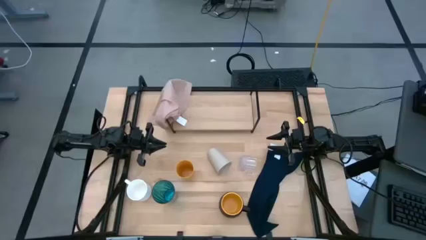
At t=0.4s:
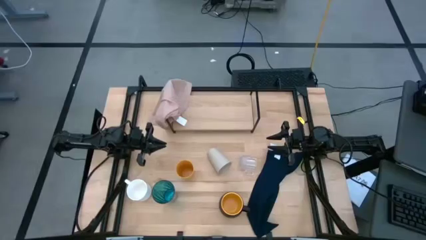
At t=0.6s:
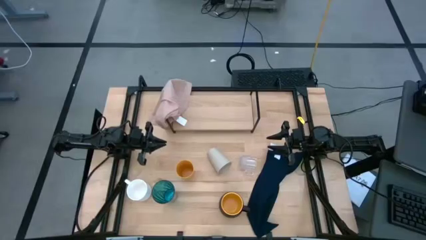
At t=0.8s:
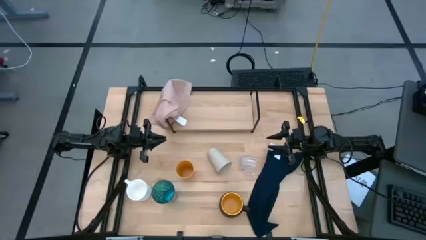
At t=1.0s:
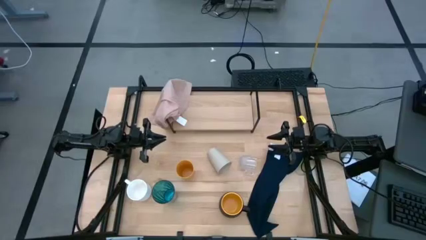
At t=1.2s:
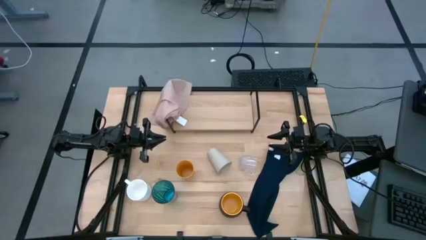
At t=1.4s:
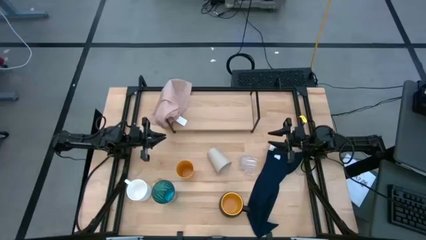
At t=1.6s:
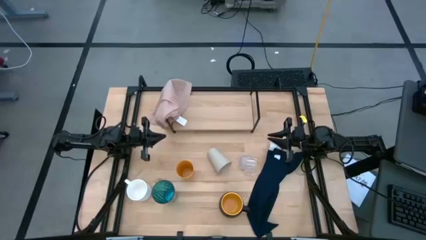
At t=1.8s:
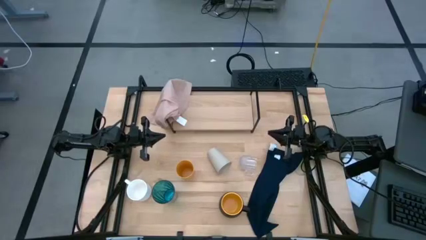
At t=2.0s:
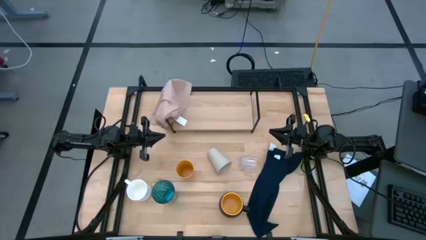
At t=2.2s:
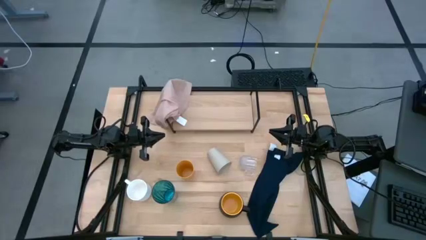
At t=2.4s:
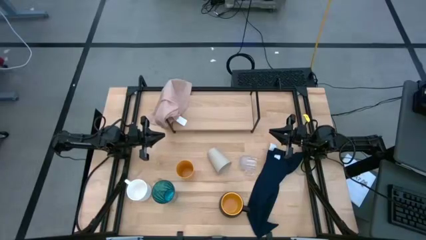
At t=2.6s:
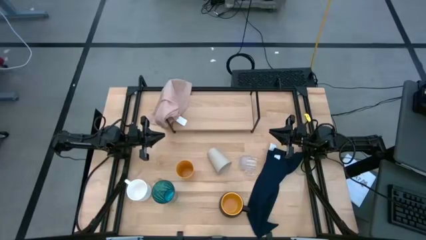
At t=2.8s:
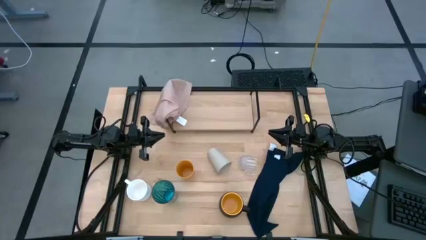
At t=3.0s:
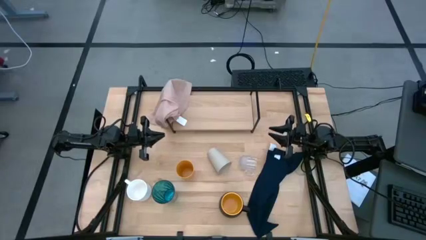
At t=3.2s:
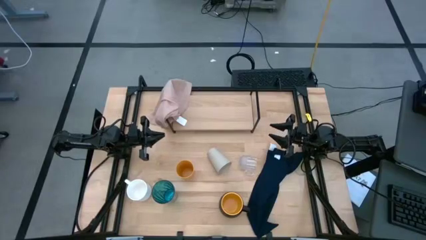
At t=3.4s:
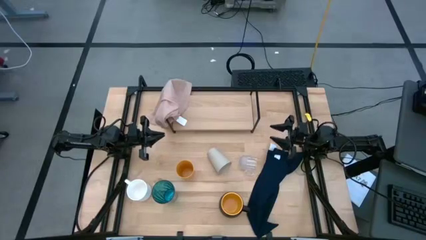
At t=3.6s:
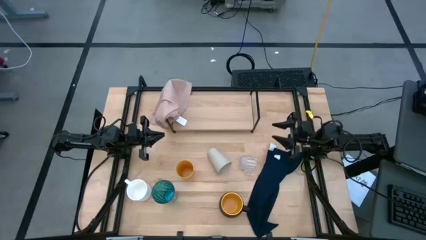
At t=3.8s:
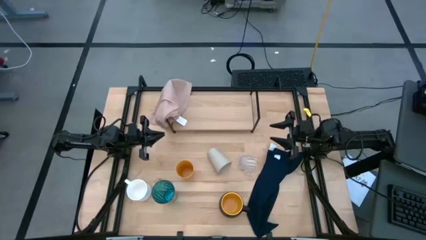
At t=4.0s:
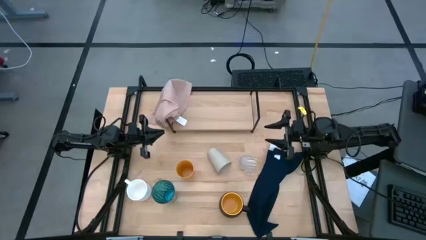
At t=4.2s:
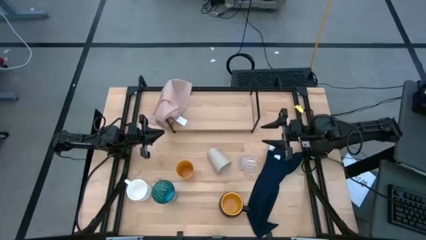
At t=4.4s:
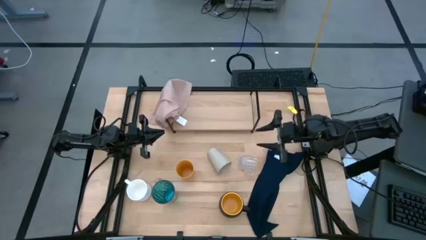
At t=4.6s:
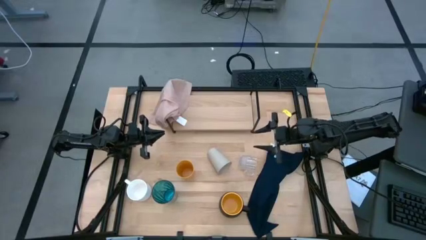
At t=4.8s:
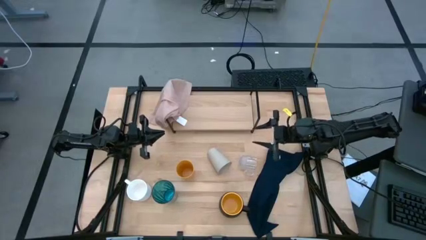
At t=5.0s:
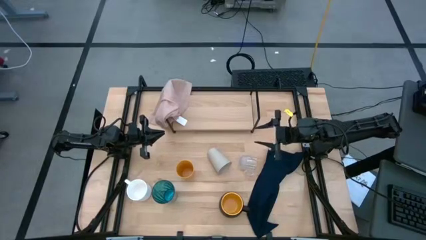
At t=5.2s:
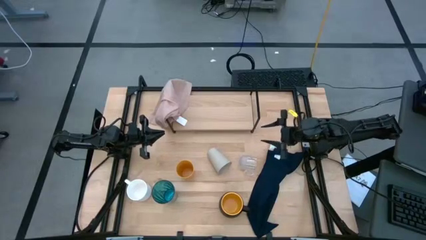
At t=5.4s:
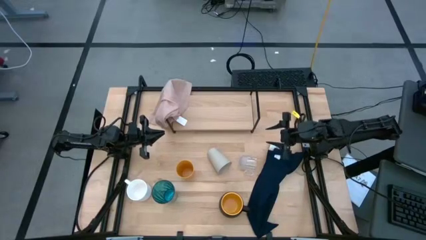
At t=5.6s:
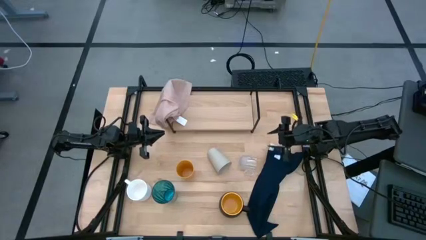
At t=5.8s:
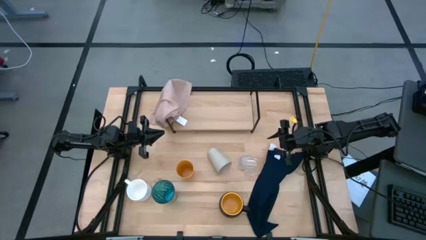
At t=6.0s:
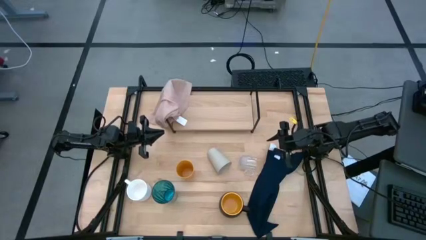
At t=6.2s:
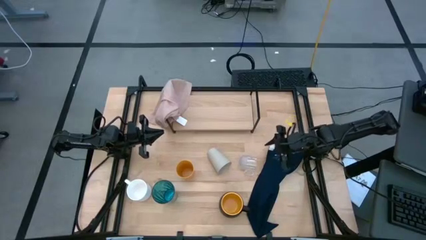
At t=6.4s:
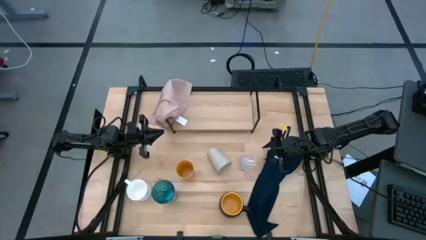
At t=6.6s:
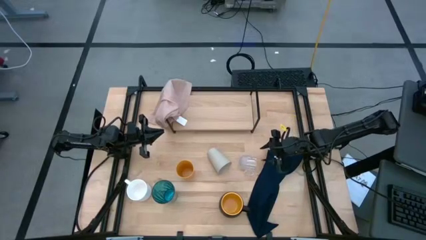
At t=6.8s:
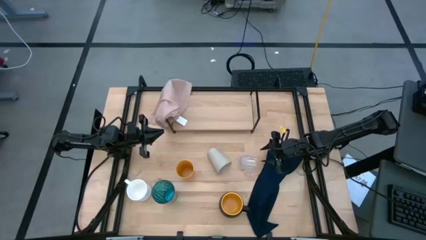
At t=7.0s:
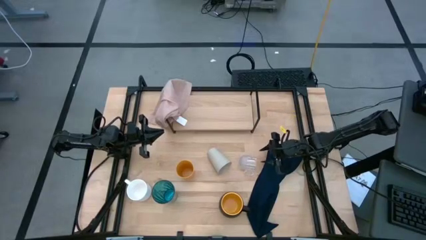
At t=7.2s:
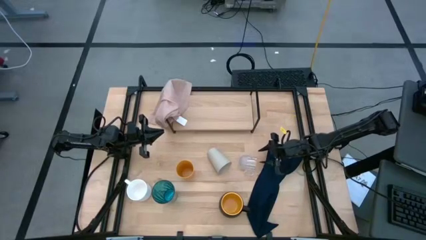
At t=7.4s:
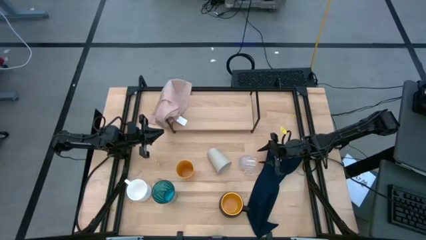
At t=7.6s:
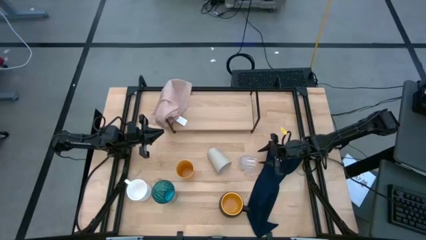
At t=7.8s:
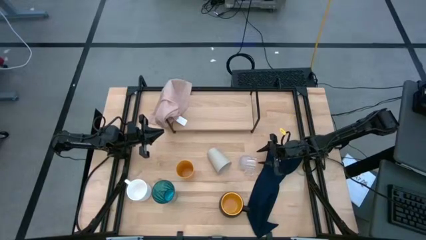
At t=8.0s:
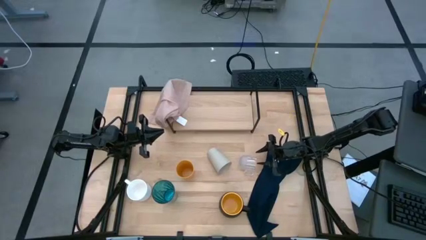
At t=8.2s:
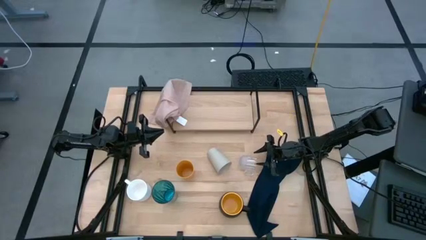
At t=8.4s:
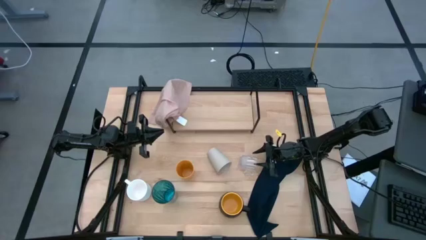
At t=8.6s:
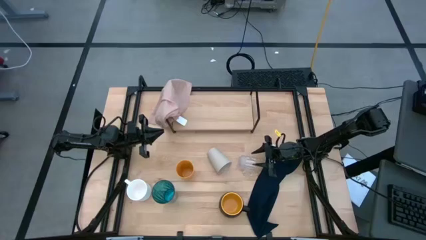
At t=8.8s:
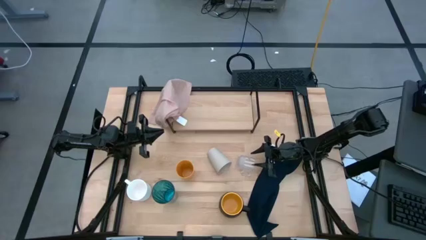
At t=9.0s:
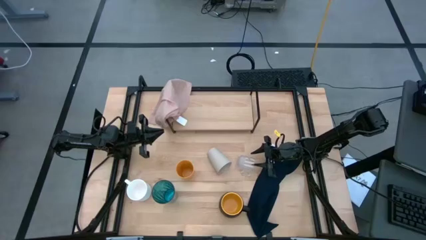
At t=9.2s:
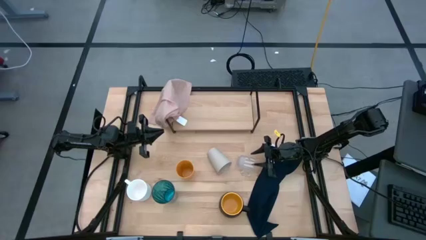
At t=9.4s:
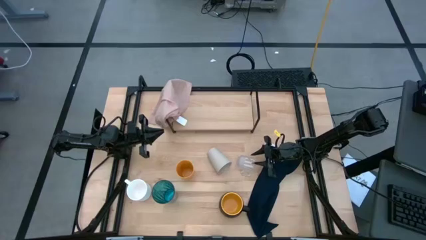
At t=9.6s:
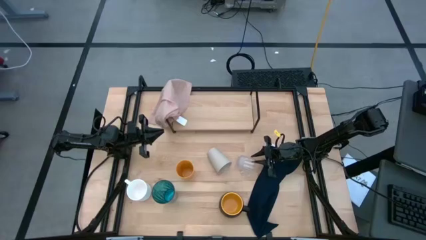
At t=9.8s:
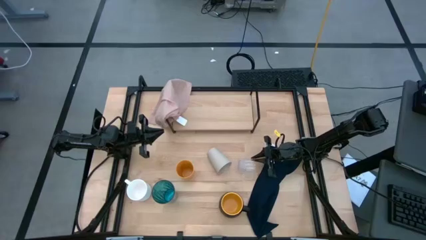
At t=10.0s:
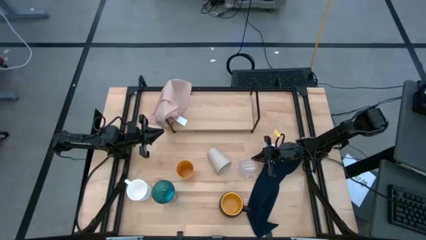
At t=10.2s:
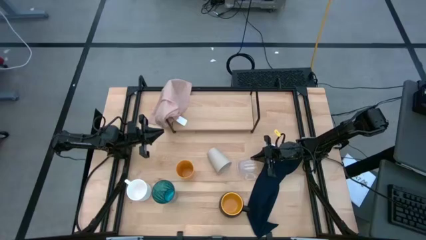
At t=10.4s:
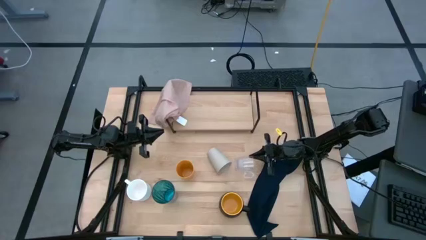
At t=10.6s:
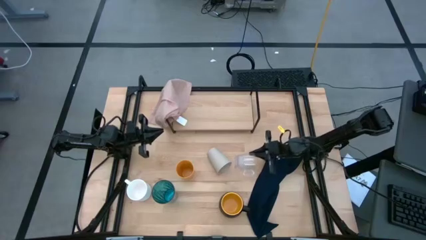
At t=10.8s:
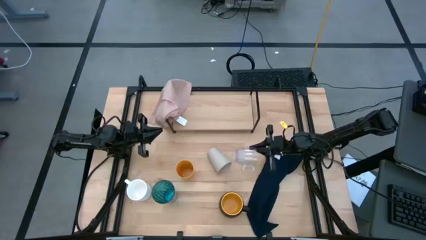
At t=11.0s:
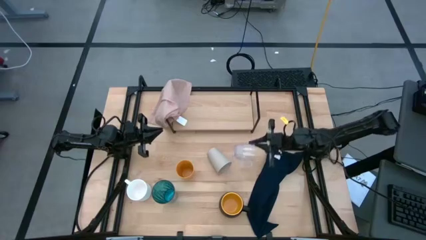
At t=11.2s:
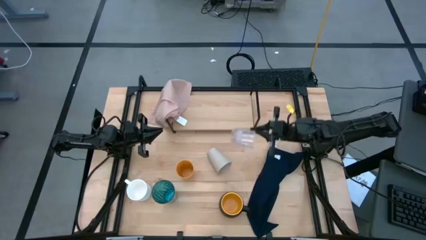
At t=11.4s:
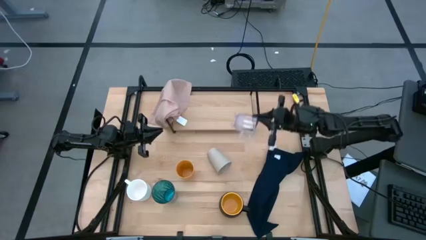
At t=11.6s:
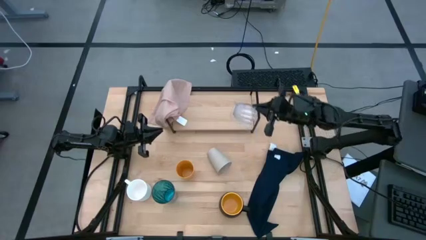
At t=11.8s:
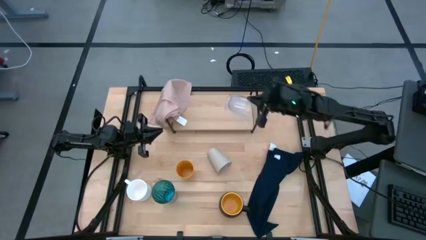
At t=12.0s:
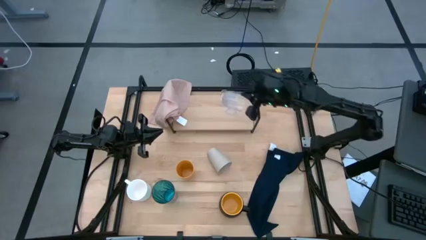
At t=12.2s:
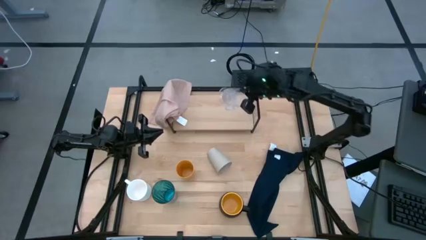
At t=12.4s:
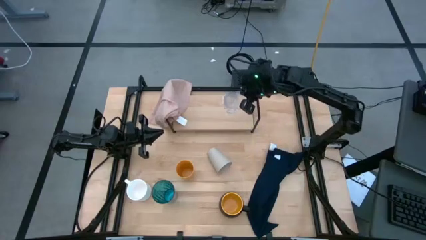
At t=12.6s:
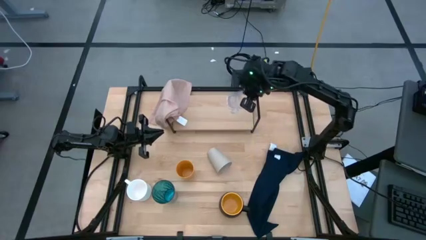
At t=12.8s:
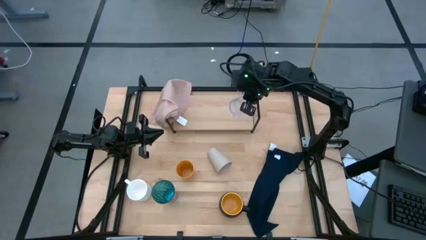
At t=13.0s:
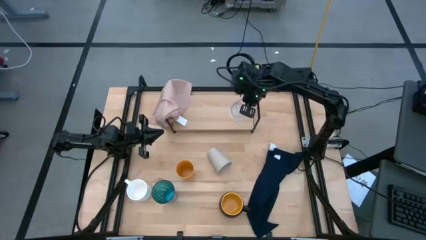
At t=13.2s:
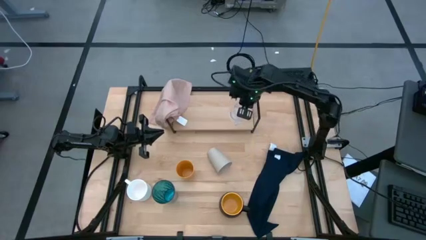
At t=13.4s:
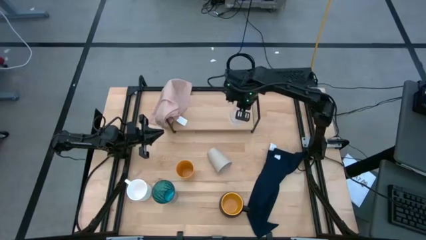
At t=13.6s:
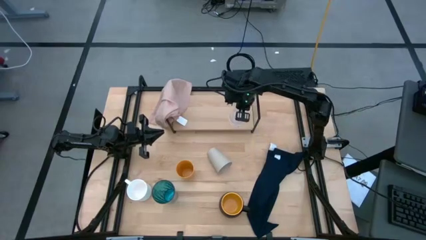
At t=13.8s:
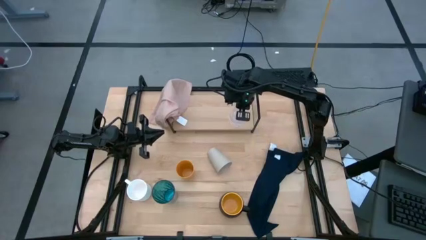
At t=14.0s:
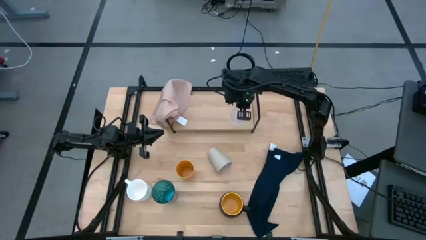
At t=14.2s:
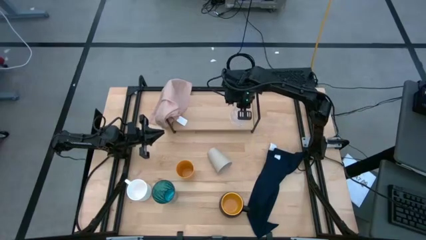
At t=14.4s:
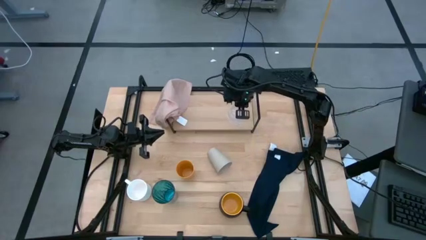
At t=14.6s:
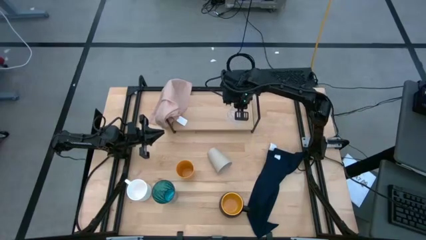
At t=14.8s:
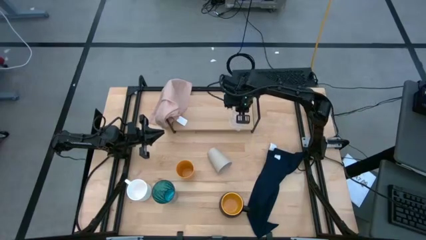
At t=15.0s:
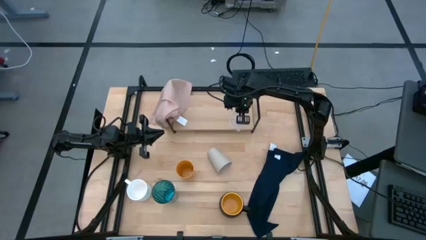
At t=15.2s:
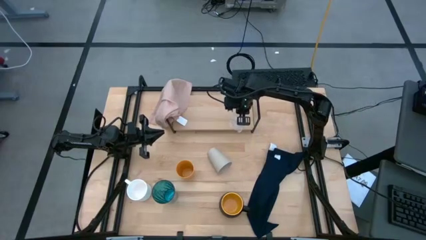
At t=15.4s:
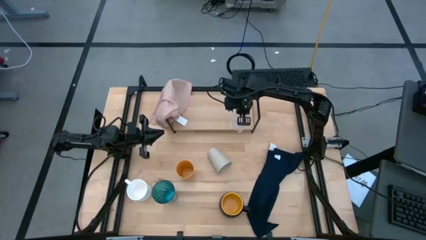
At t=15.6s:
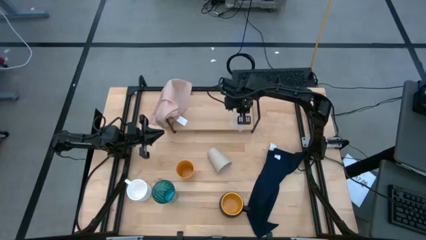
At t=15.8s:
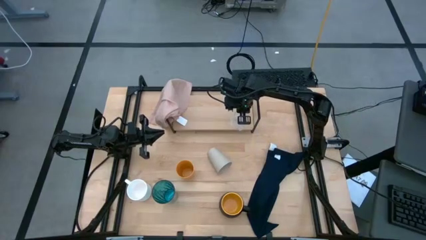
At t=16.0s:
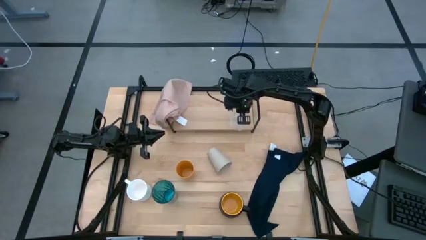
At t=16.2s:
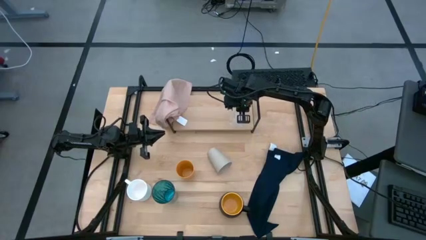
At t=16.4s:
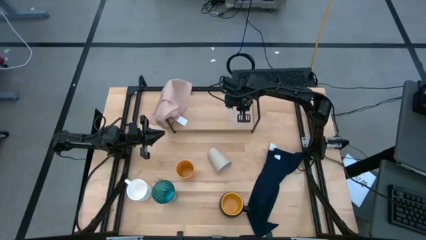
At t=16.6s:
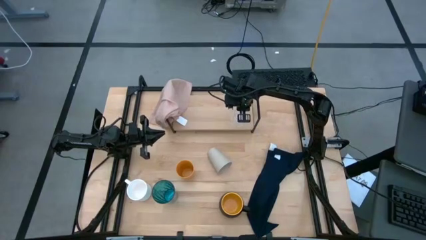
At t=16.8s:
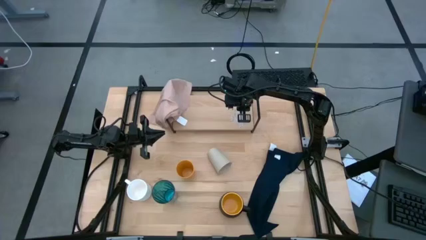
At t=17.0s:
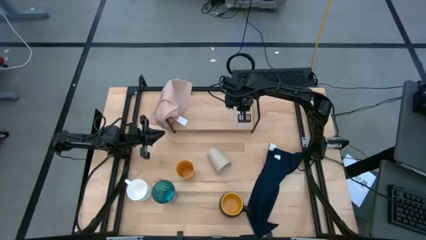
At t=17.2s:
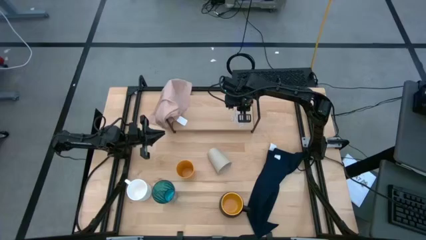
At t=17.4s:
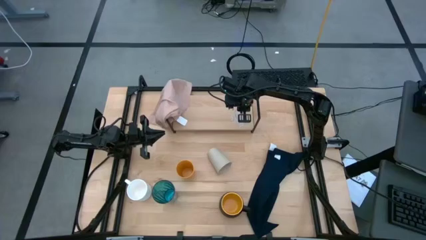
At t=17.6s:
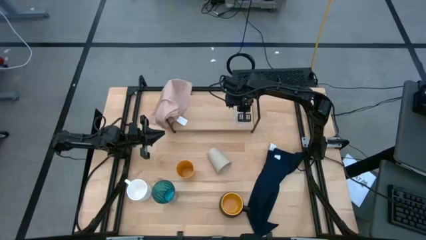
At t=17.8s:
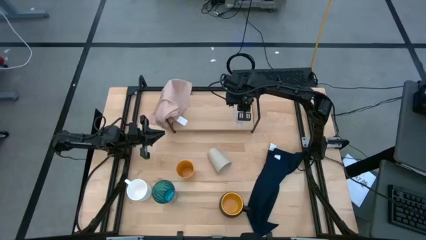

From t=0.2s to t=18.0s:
Task: Stack small to large cups/mugs on shelf
Put the transparent mug on the shelf
